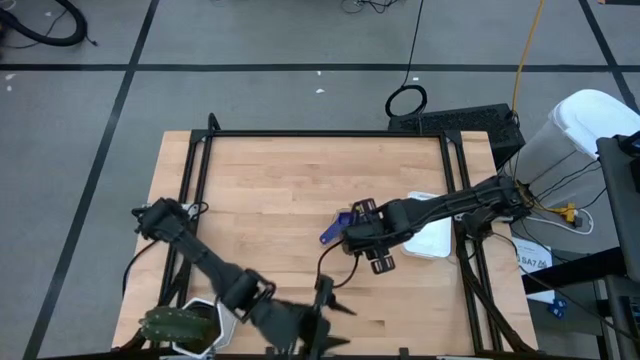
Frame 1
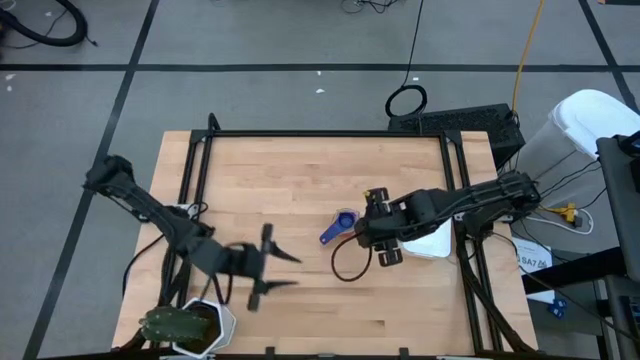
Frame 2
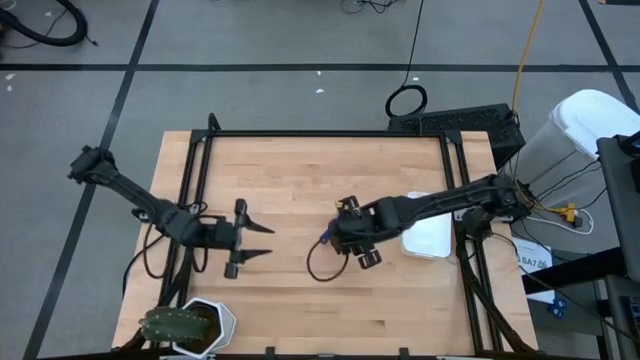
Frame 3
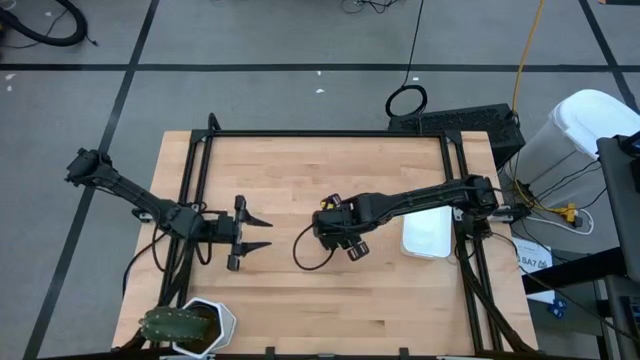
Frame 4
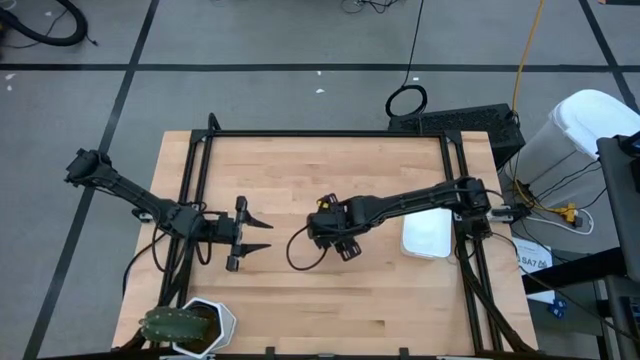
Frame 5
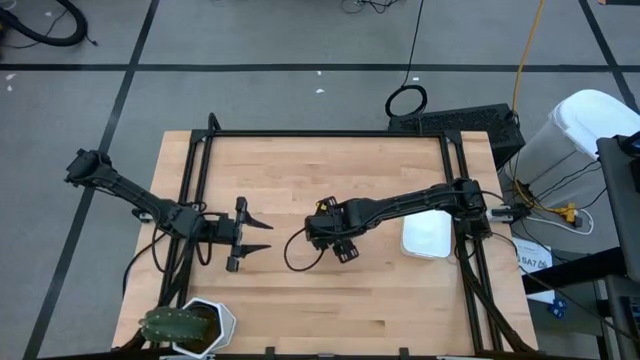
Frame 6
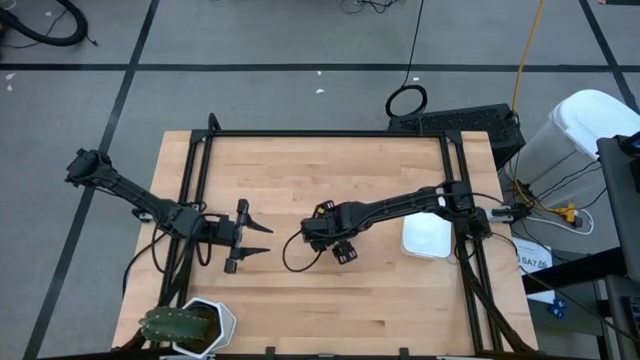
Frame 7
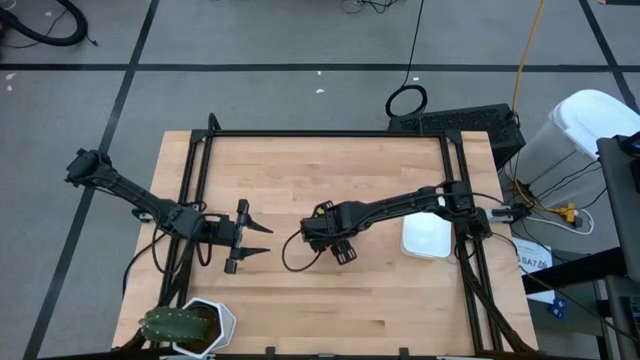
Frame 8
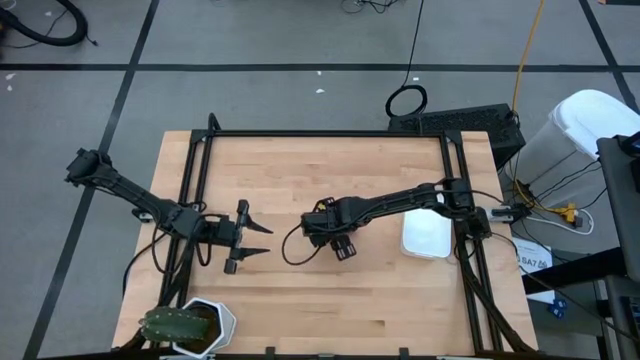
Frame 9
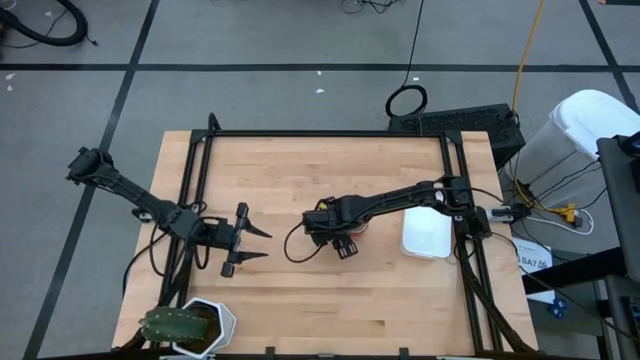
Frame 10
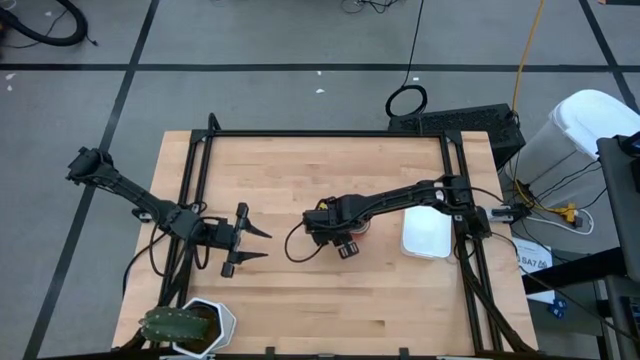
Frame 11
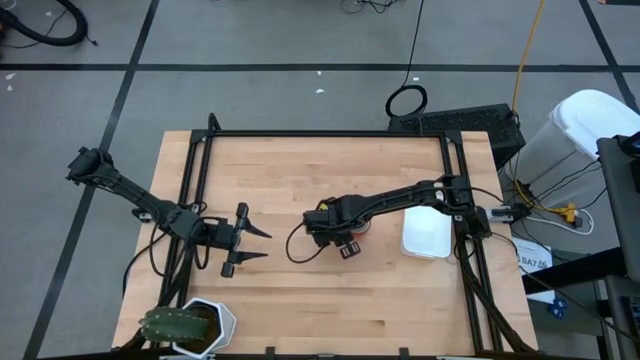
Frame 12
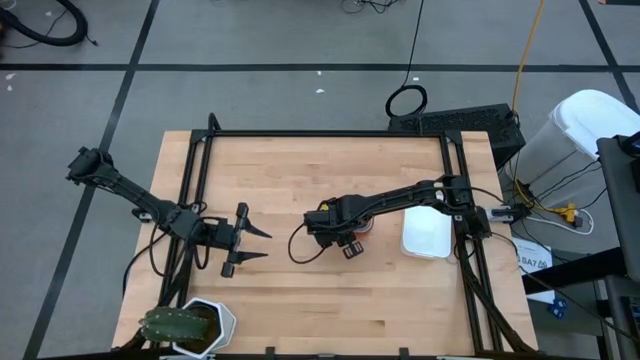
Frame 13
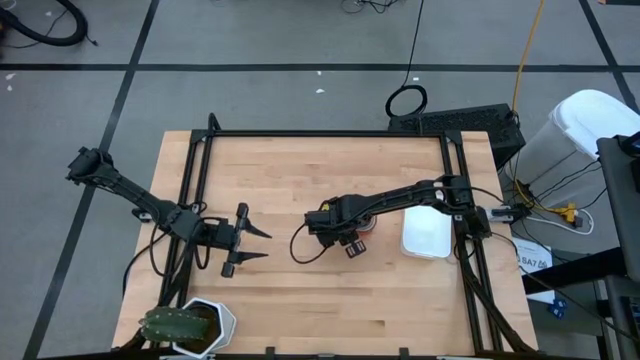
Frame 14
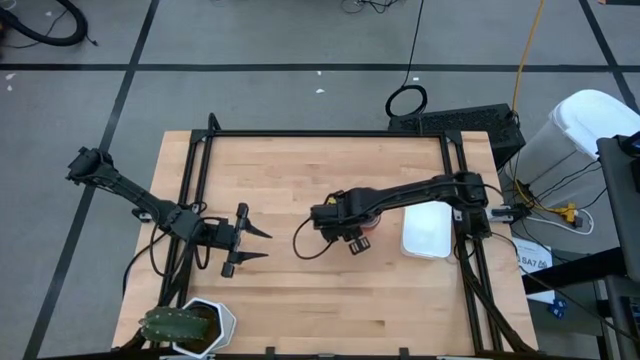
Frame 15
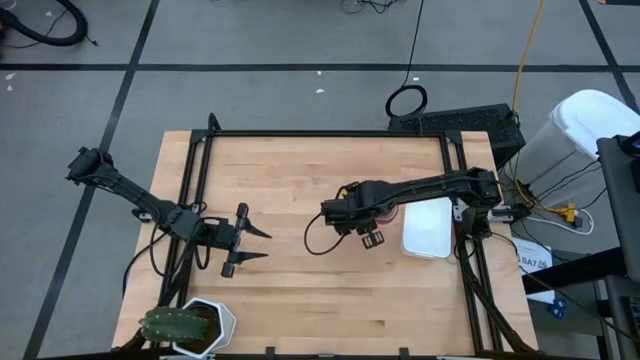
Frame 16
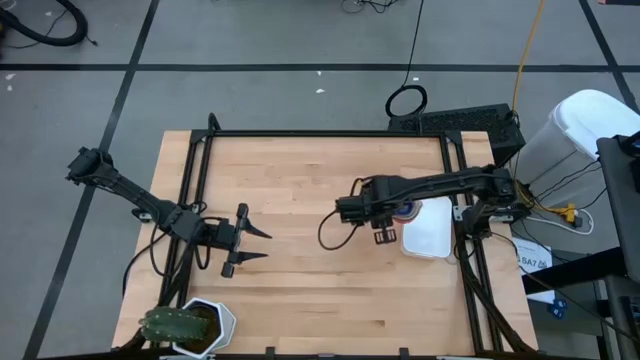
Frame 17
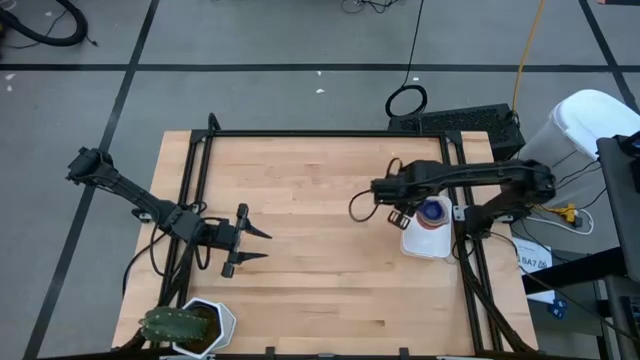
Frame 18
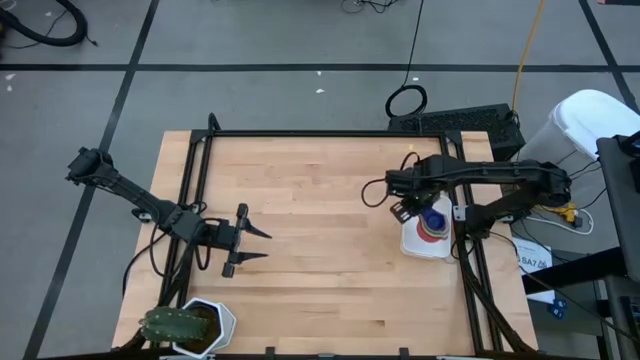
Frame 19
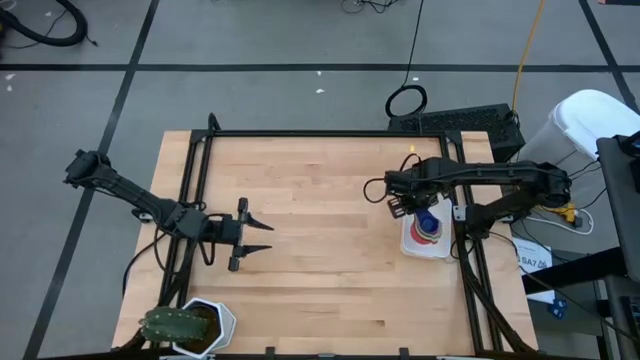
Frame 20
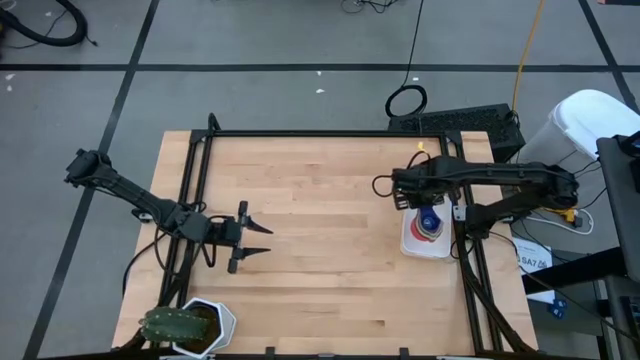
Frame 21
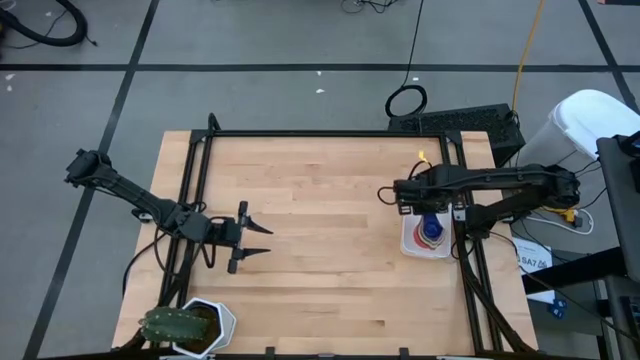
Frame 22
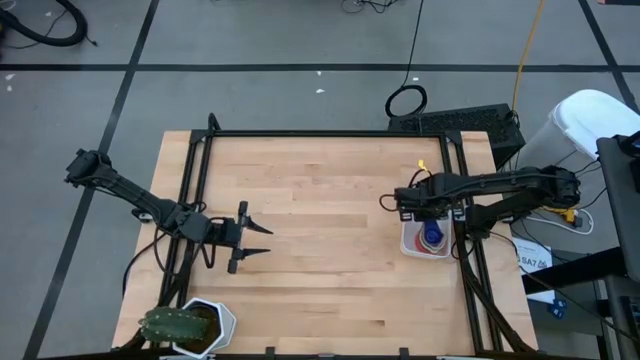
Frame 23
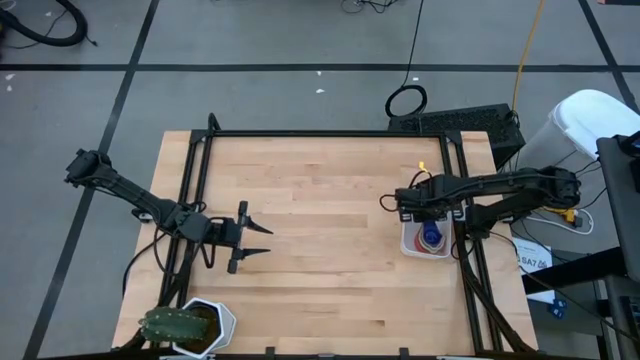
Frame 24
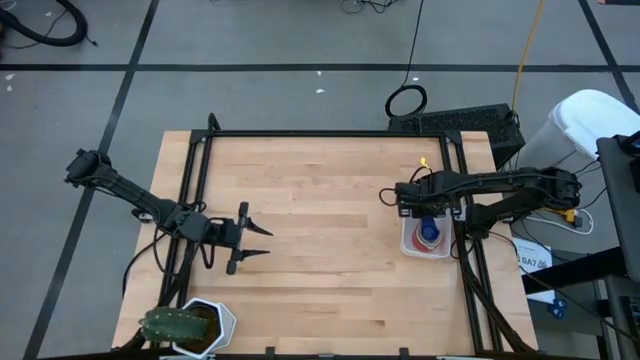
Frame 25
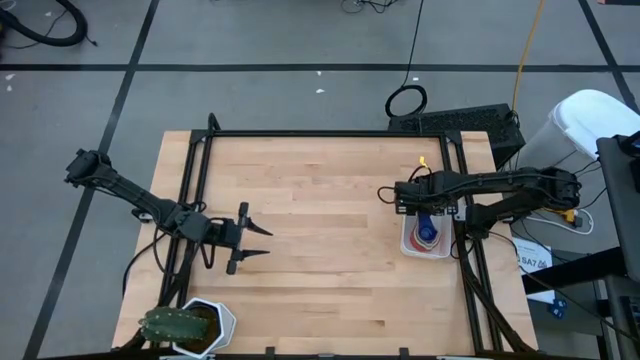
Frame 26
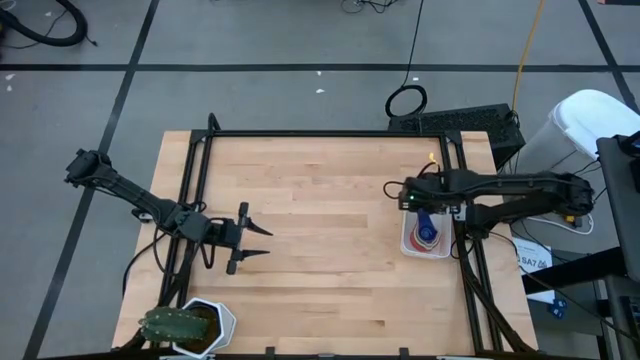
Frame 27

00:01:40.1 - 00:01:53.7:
Task: Nest measuring cups in basket
Put the nested measuring cups into the white bin

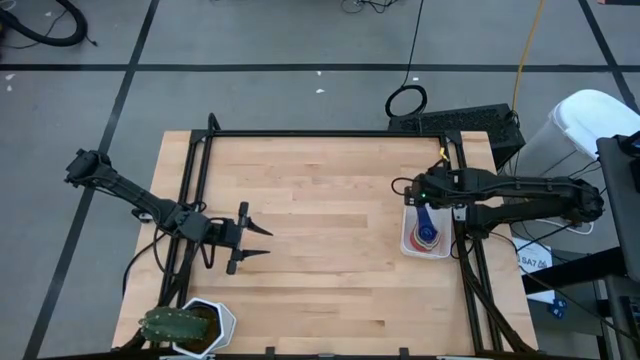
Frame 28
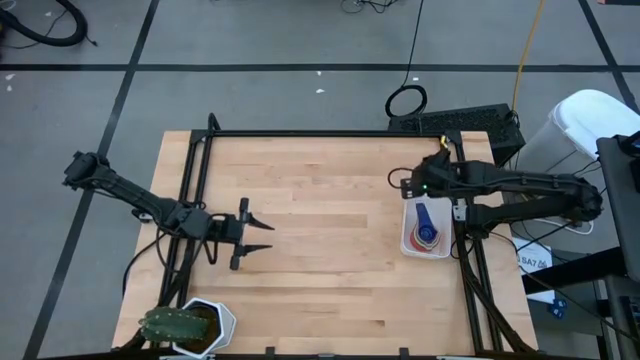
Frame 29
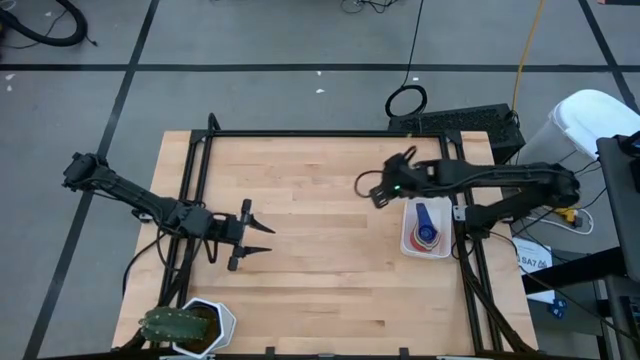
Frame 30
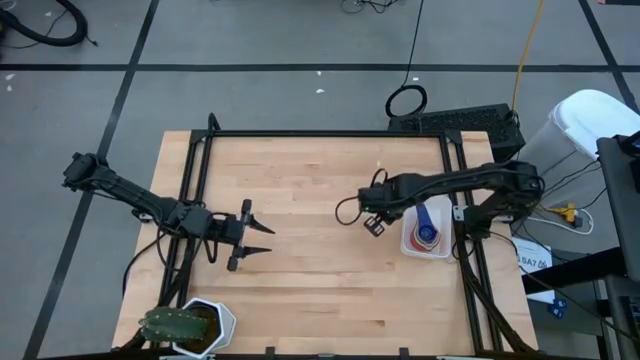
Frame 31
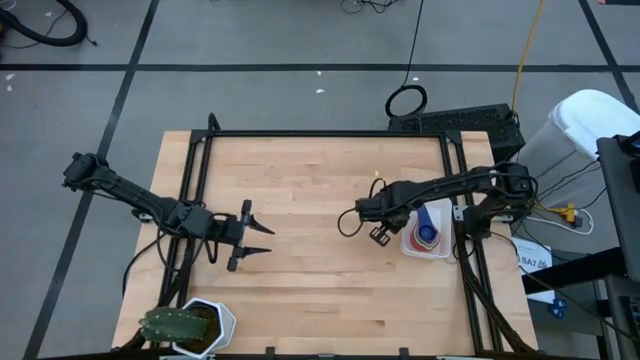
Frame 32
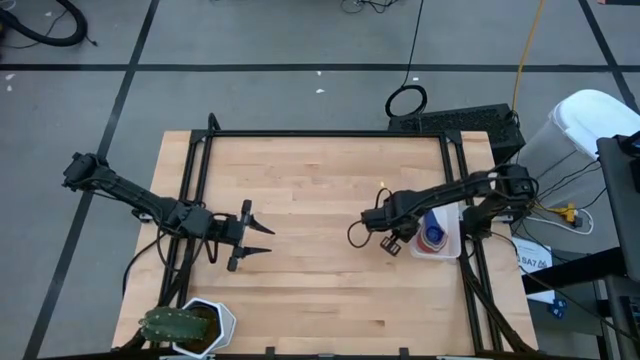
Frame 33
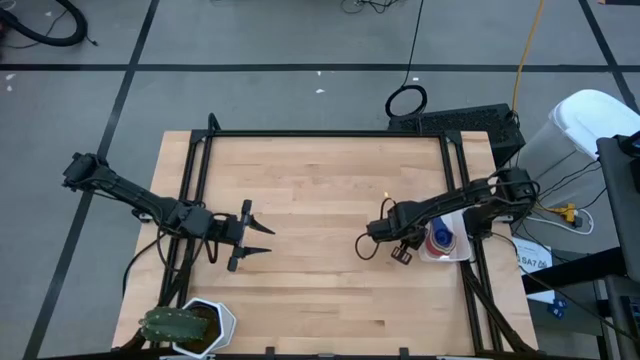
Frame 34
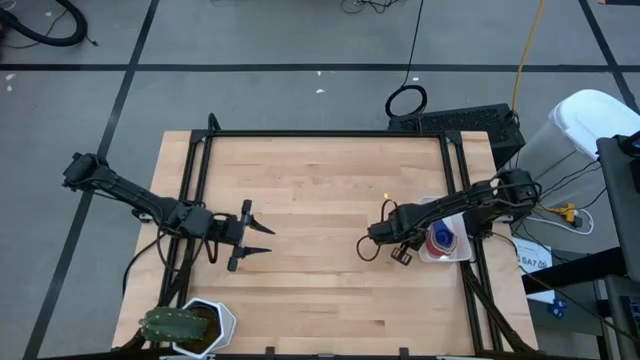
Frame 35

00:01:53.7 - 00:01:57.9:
Adjust the white bin on the table

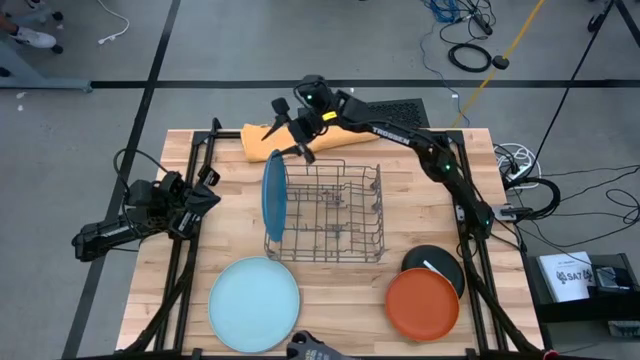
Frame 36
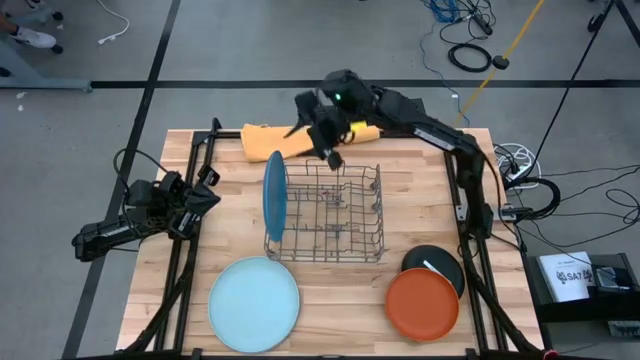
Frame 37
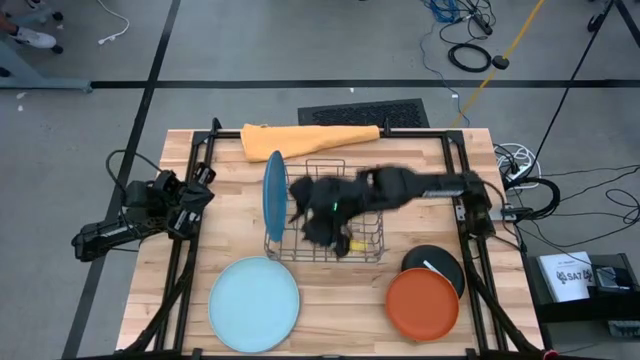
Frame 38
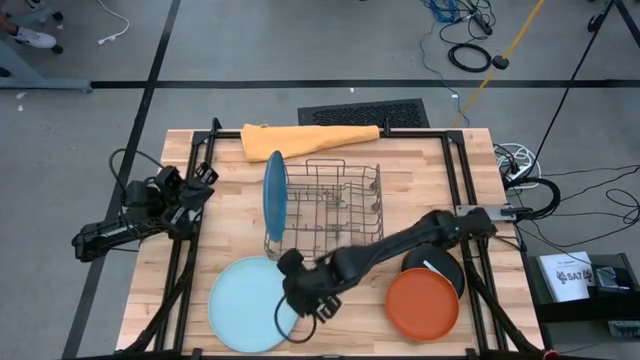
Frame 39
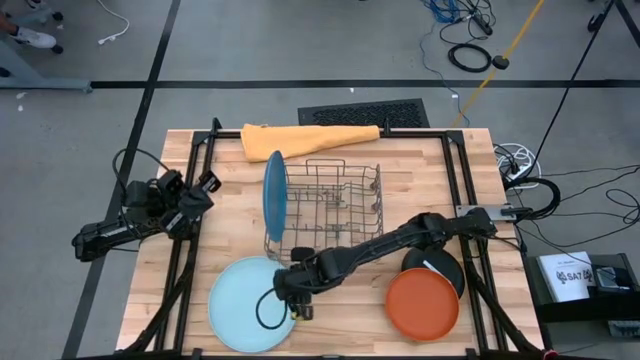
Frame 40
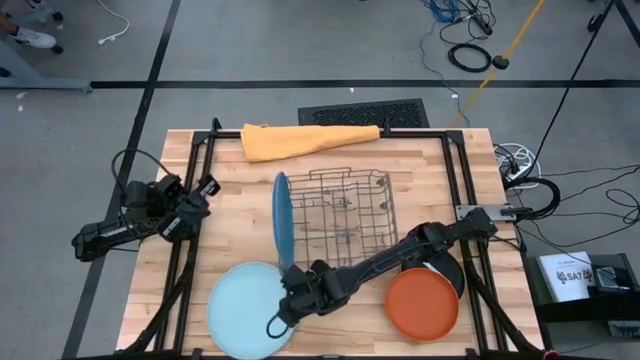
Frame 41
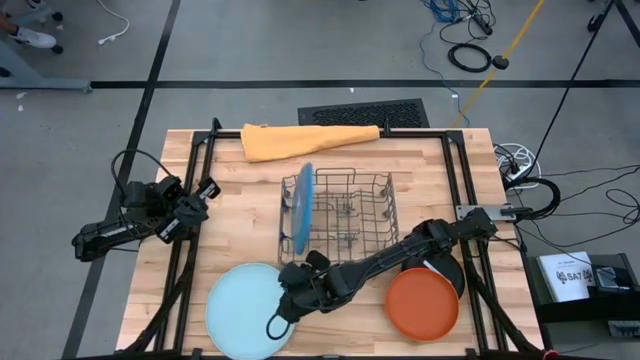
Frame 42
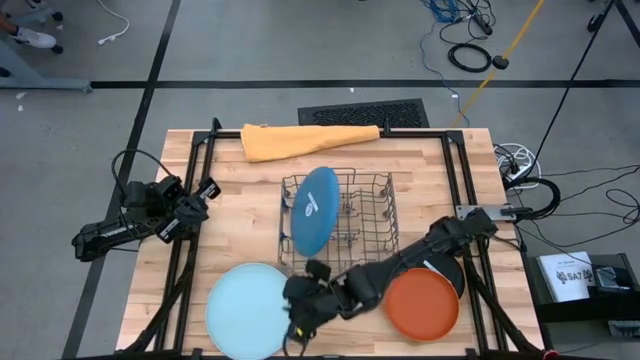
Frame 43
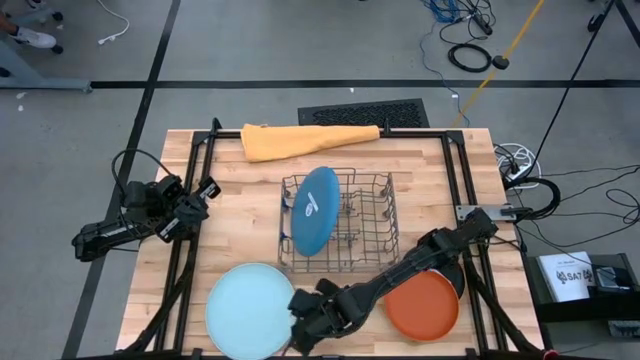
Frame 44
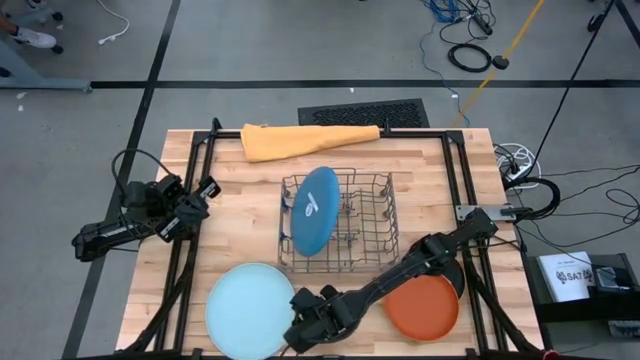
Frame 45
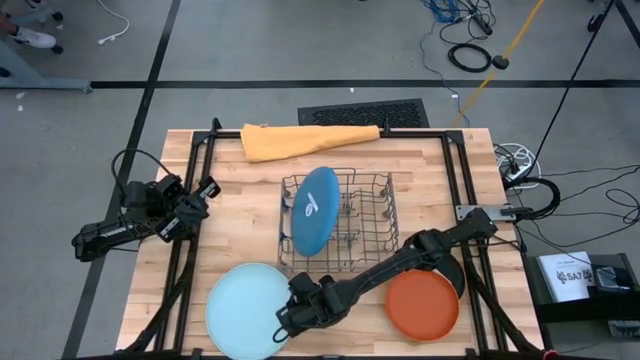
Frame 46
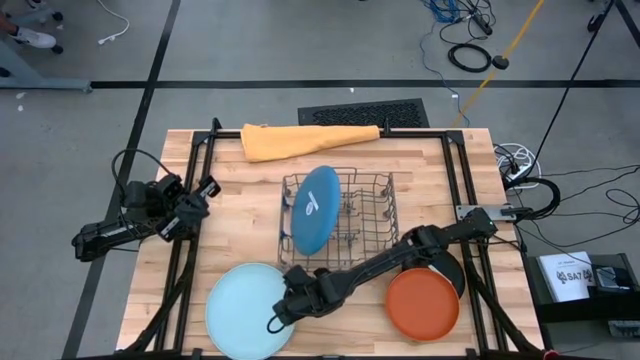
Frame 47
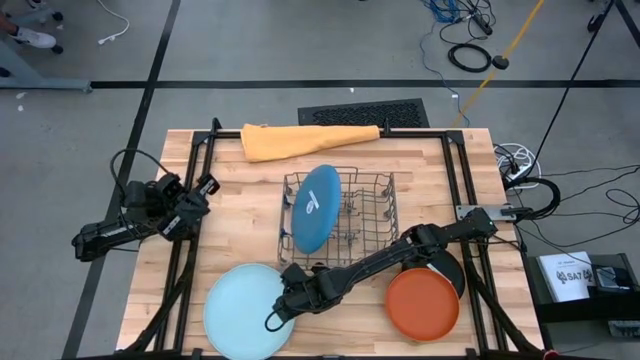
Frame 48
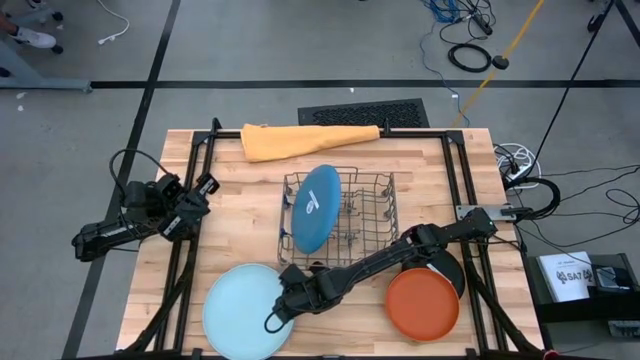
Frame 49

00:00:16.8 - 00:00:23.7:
Task: Sort dishes
Put the light blue plate in the dish rack
